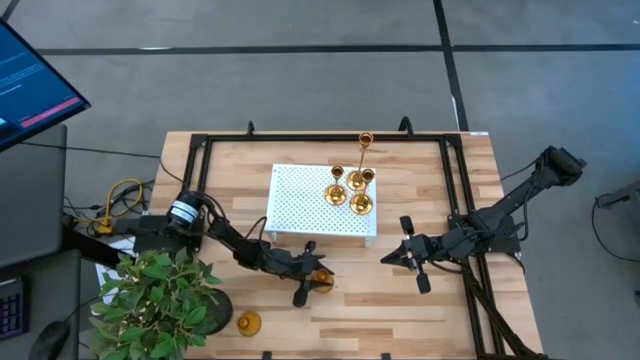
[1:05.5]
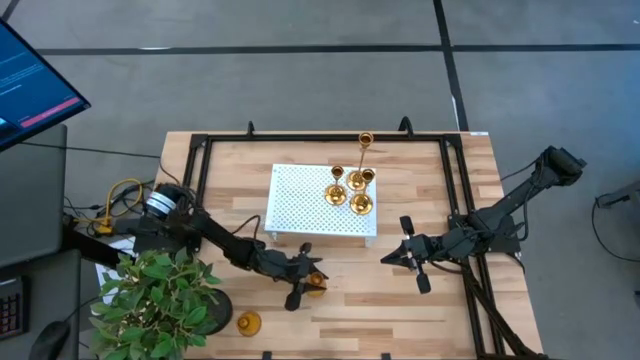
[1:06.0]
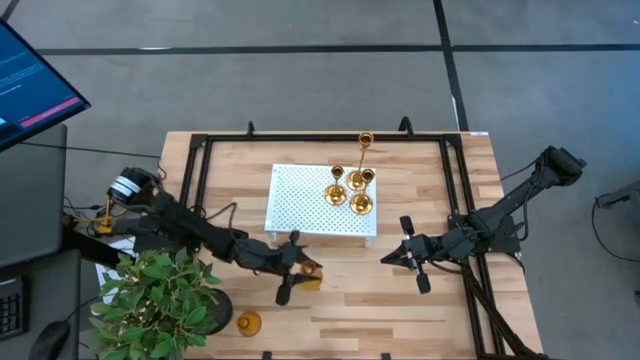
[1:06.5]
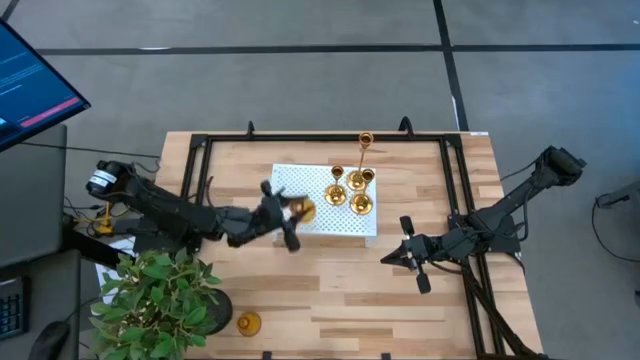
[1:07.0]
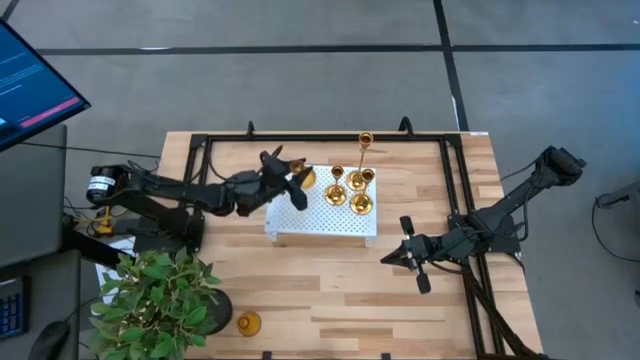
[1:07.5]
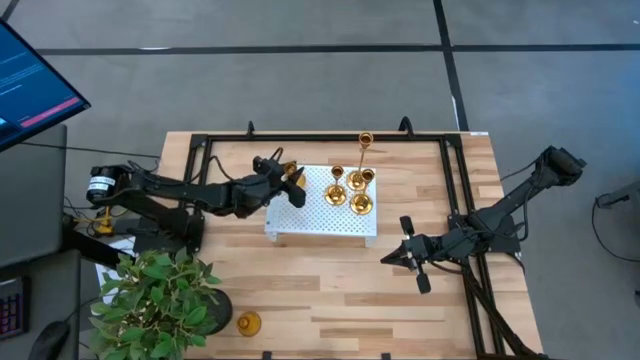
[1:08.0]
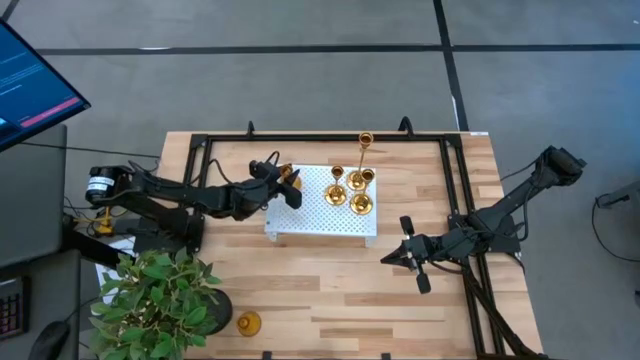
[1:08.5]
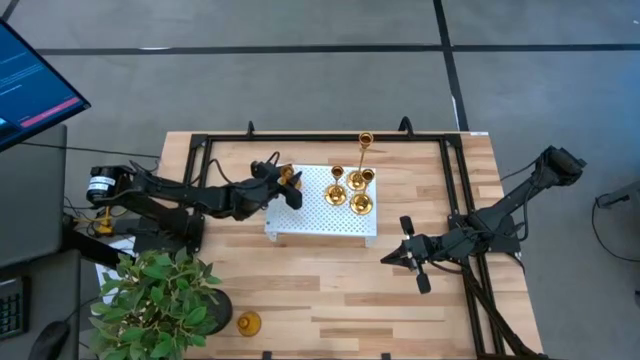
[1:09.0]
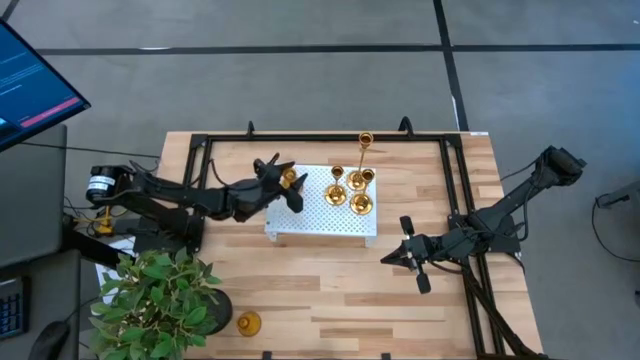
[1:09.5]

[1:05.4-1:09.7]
Task: Pick & Place candle stick holders
Put the top brown vase candle holder on the shelf

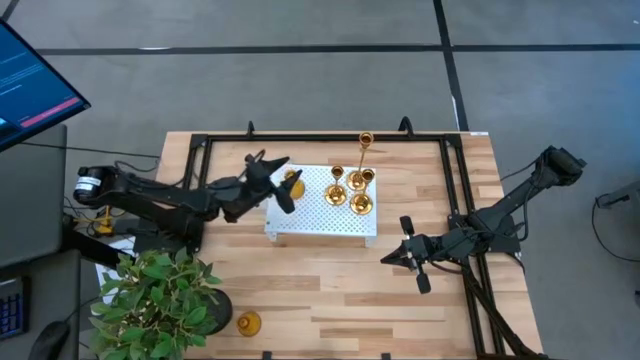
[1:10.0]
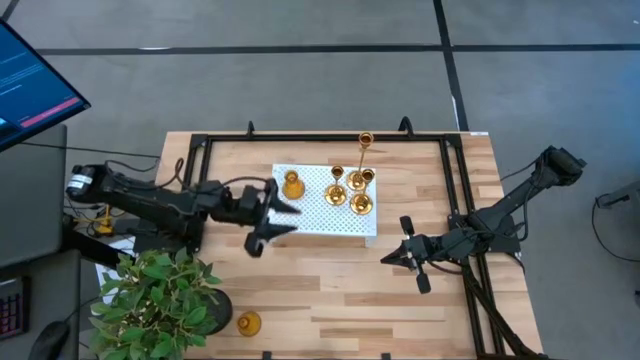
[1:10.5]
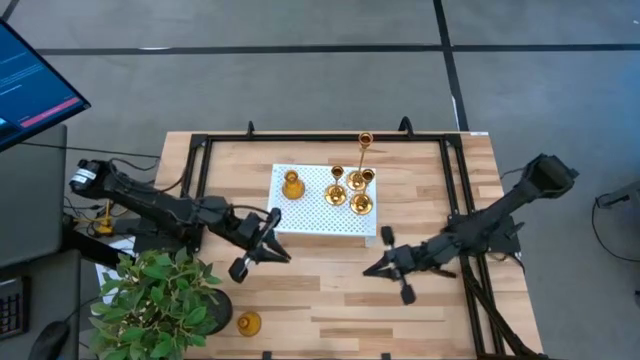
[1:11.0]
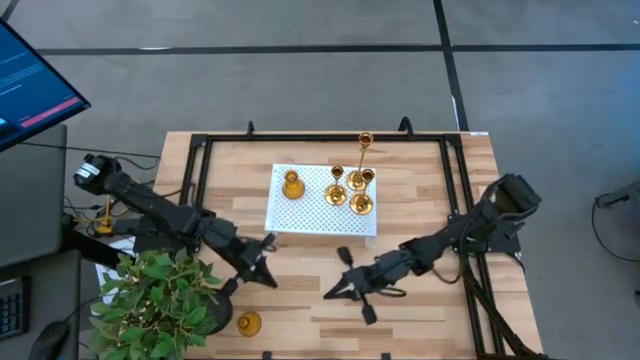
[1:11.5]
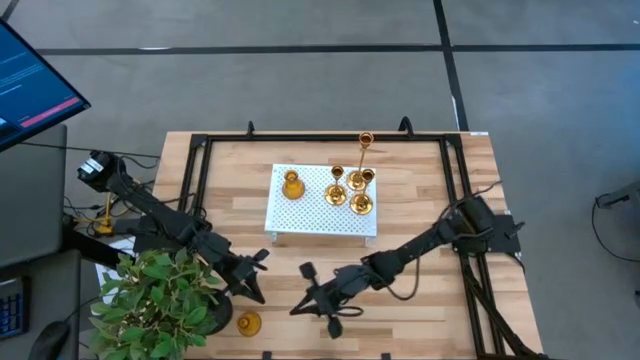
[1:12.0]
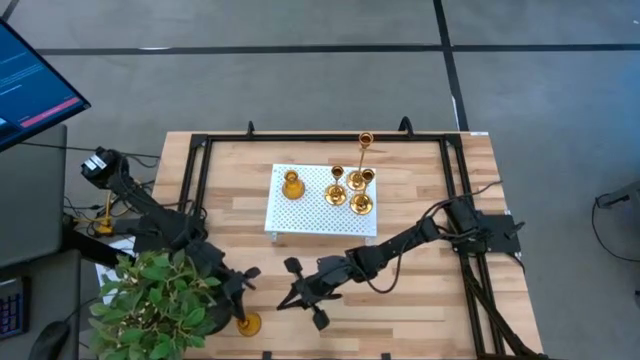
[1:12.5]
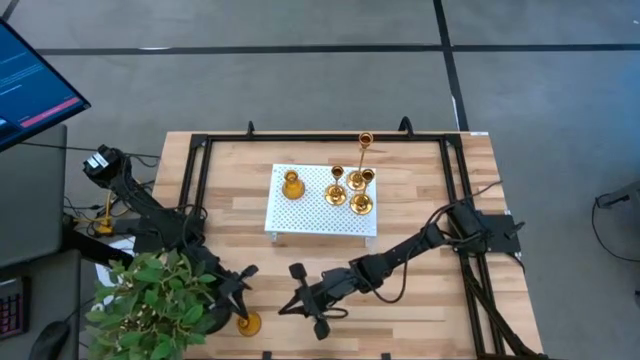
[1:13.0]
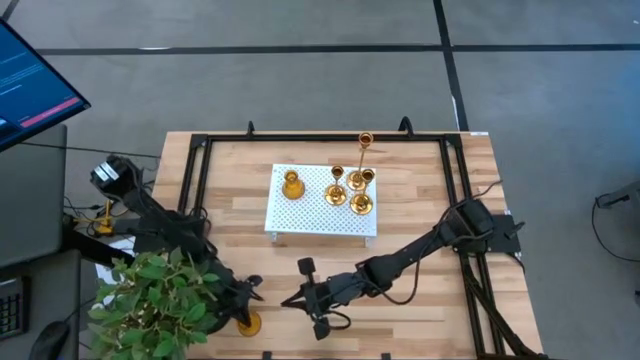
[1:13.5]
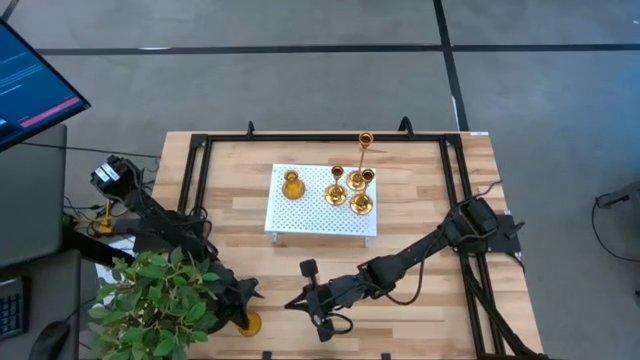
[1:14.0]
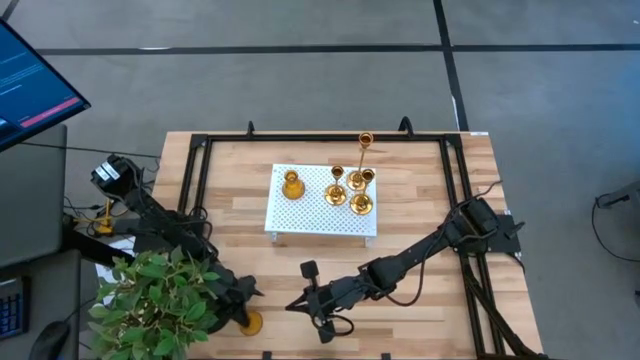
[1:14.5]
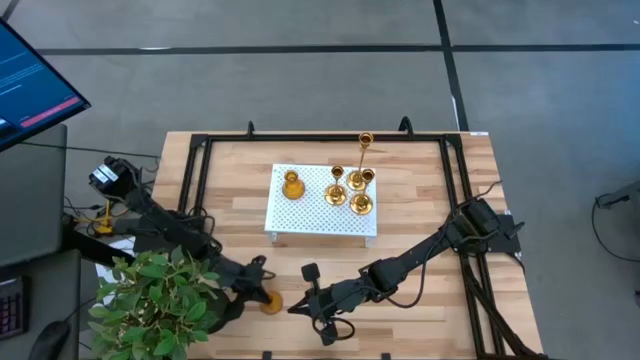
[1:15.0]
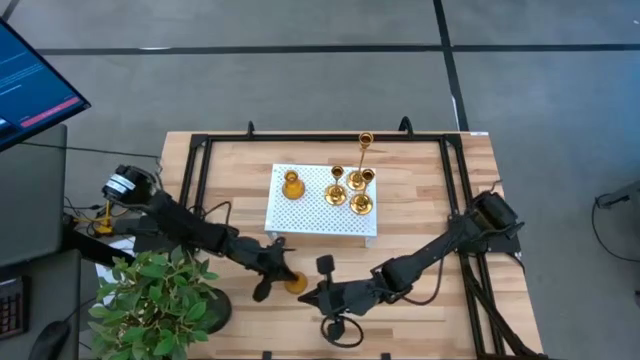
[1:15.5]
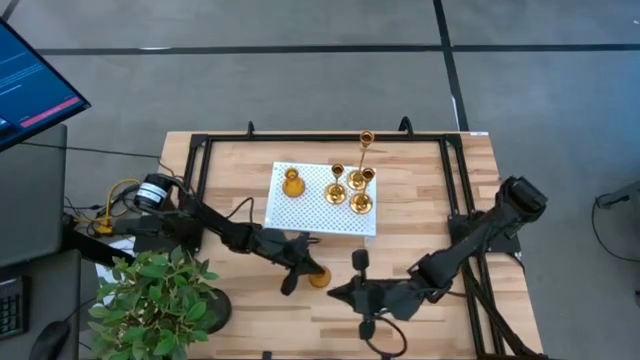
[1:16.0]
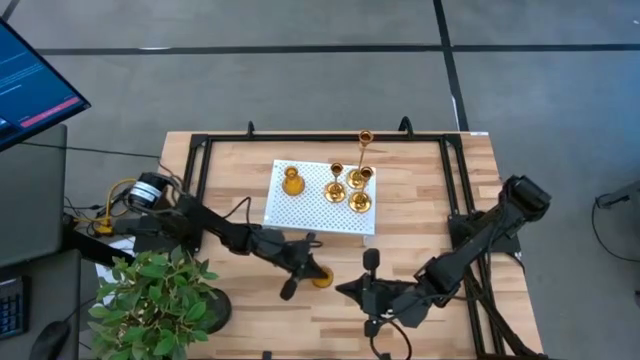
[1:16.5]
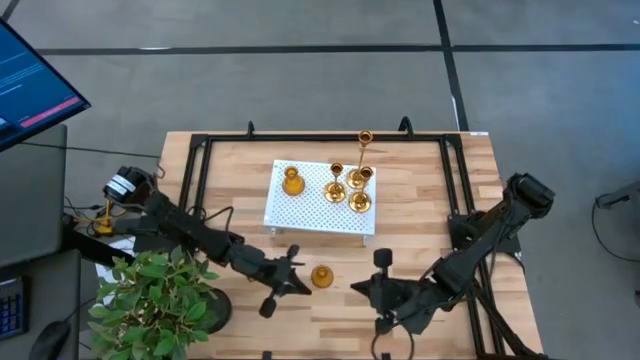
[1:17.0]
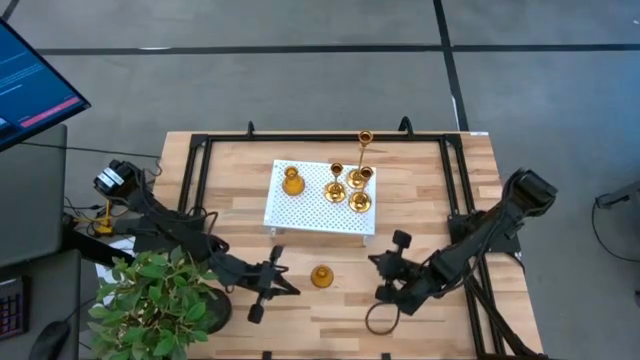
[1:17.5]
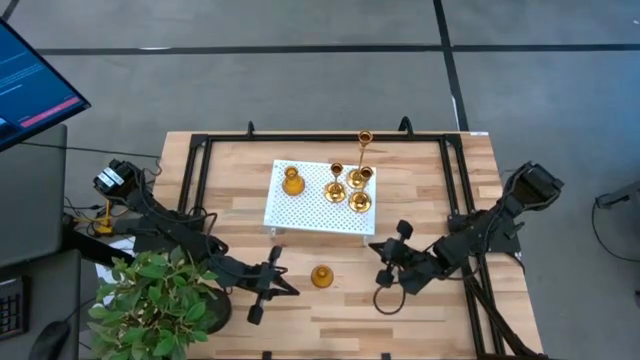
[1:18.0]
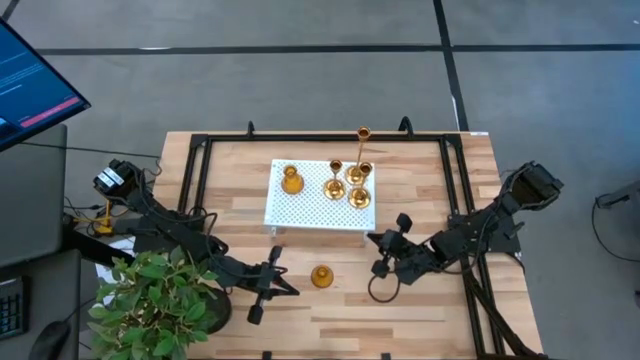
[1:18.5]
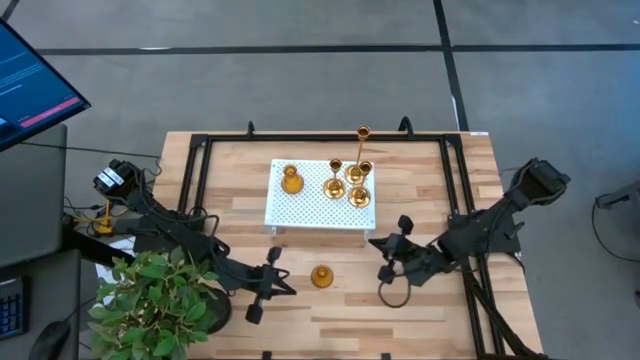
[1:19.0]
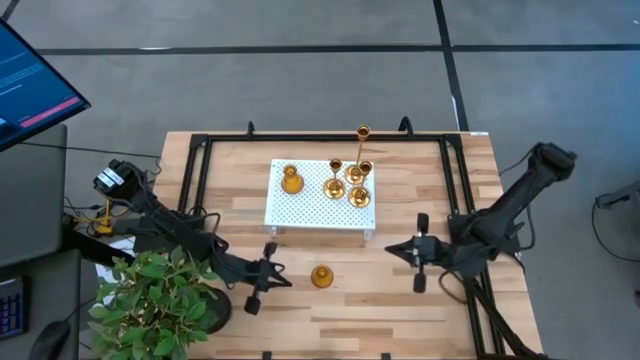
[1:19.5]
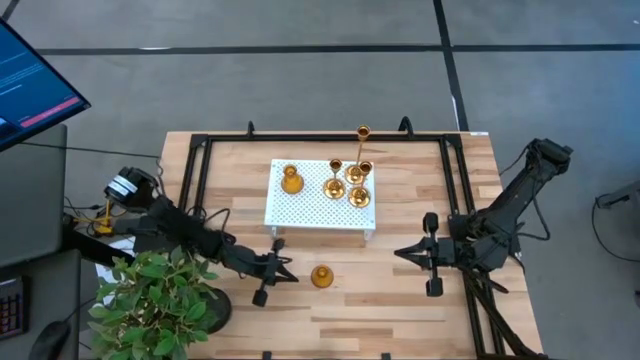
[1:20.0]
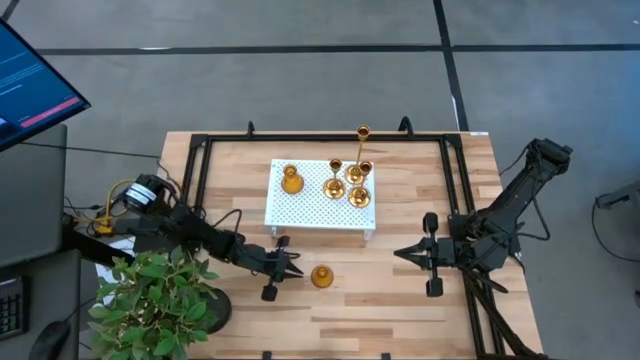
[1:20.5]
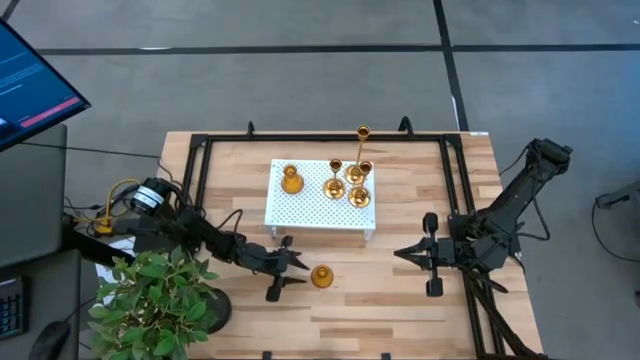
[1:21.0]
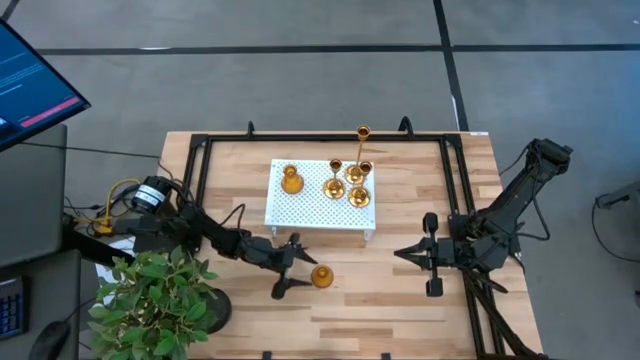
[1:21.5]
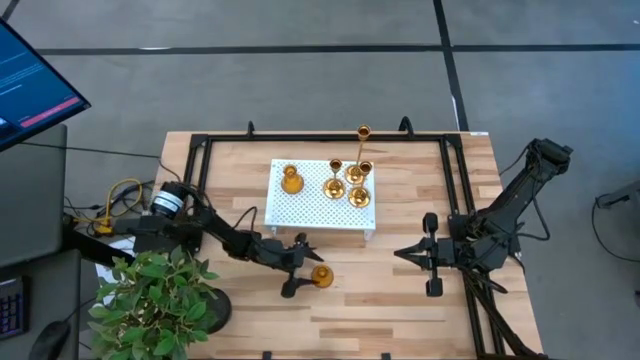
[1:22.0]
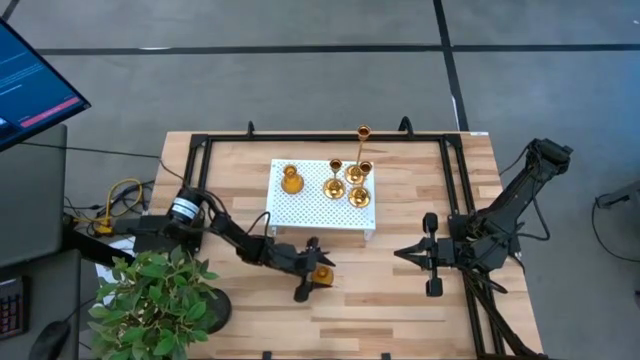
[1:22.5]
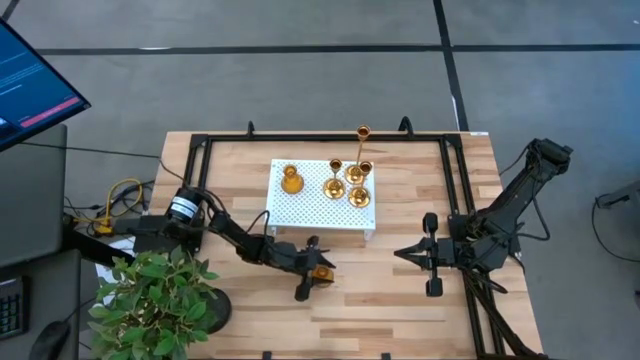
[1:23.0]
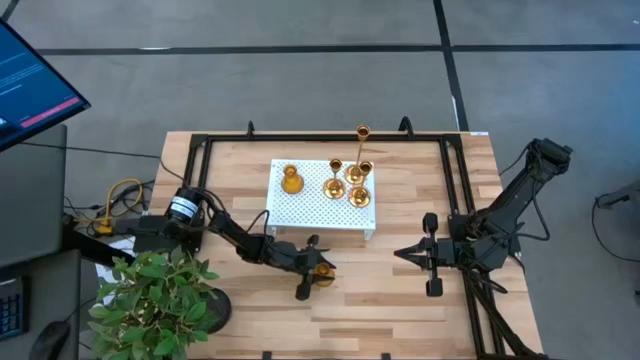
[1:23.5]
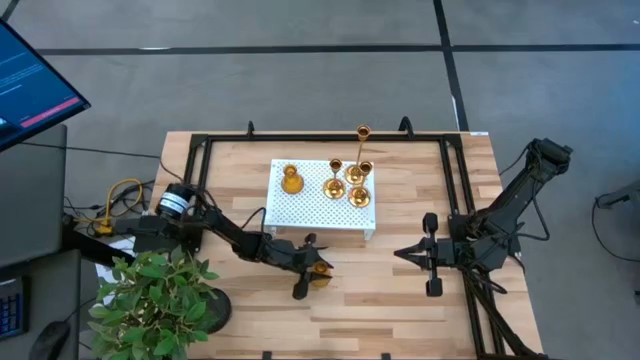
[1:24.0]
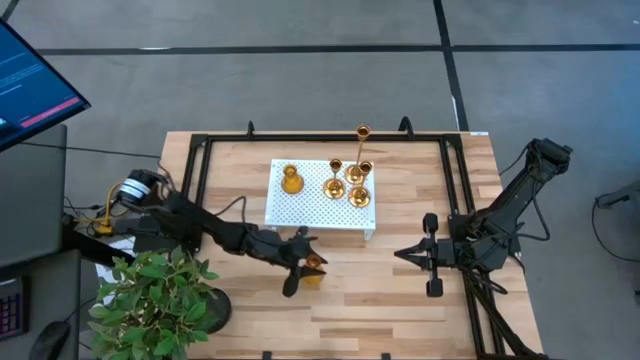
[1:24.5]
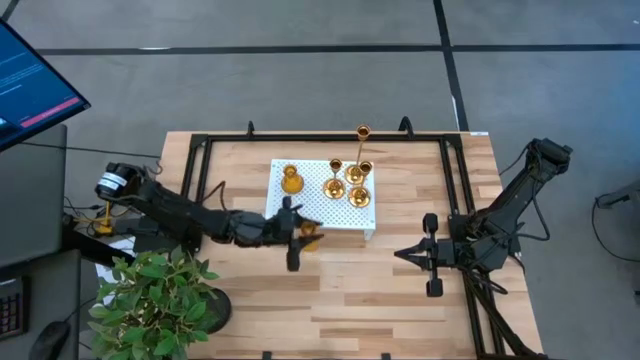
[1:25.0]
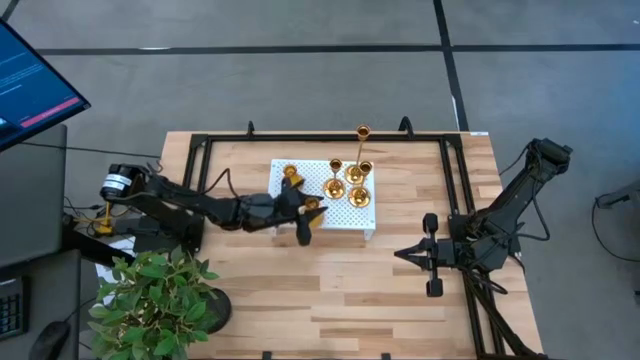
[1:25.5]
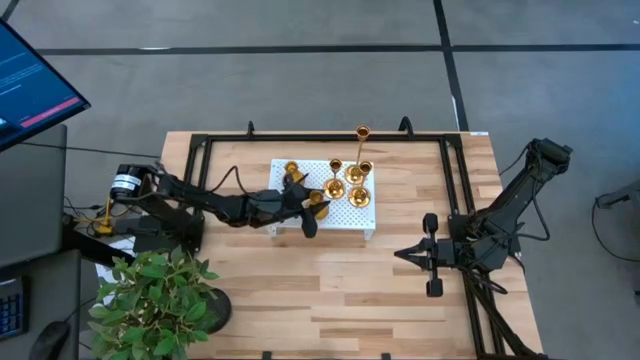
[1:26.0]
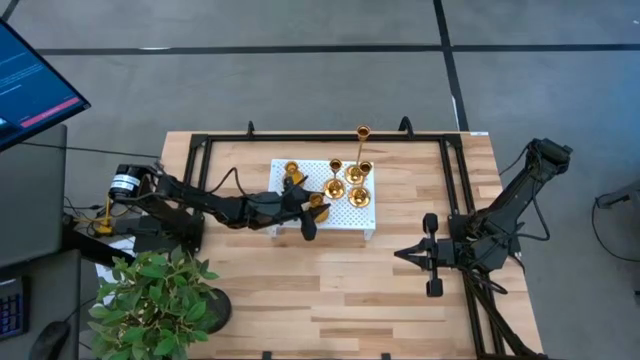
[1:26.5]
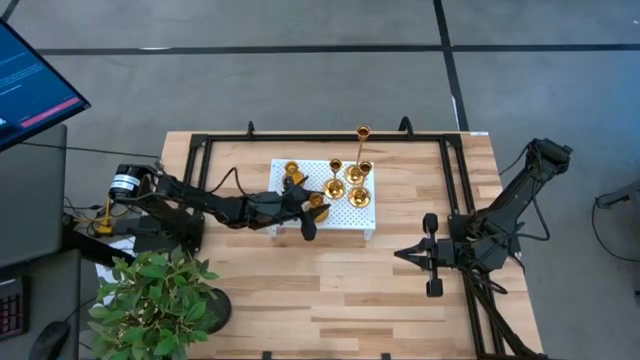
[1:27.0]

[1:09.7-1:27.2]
Put the brown vase candle holder on the shelf
